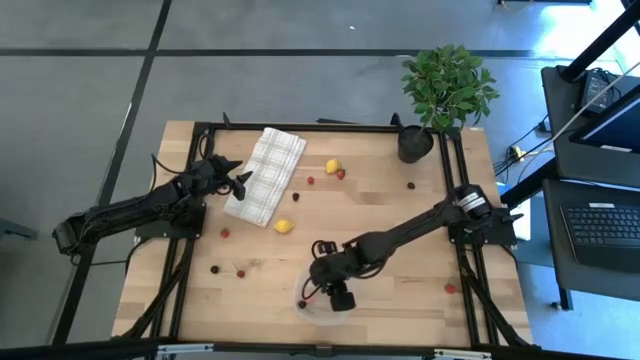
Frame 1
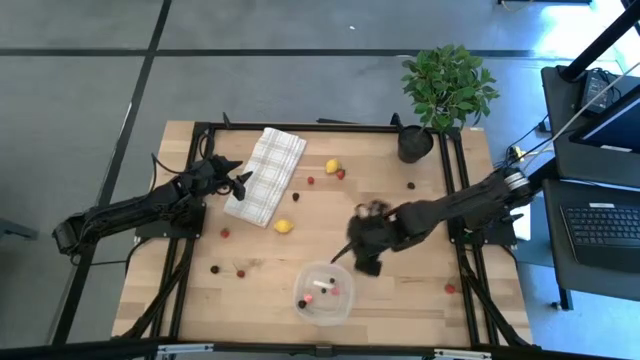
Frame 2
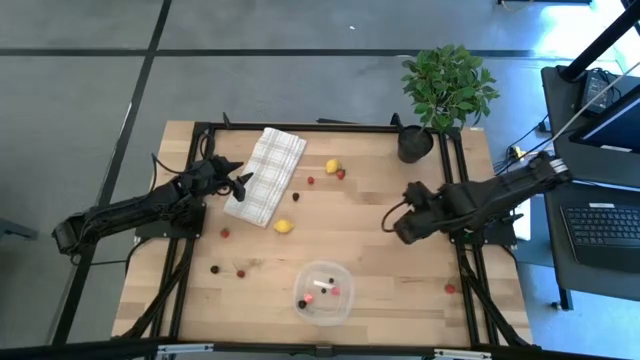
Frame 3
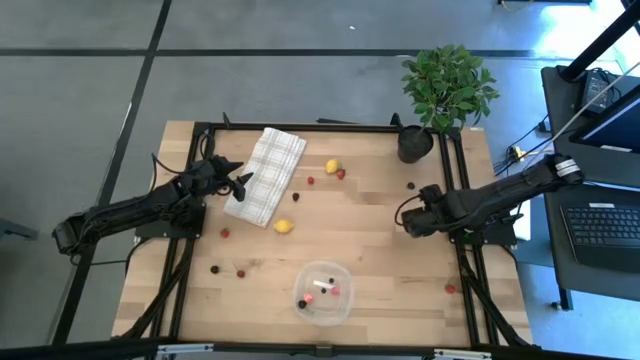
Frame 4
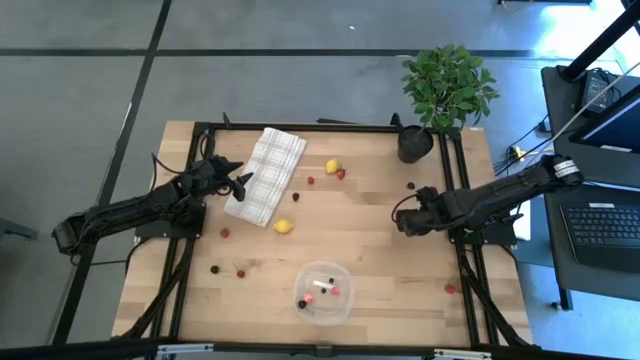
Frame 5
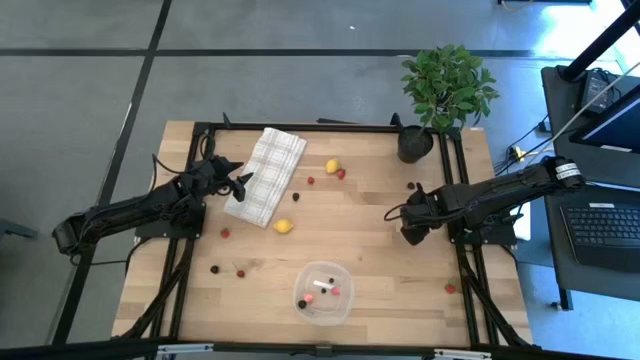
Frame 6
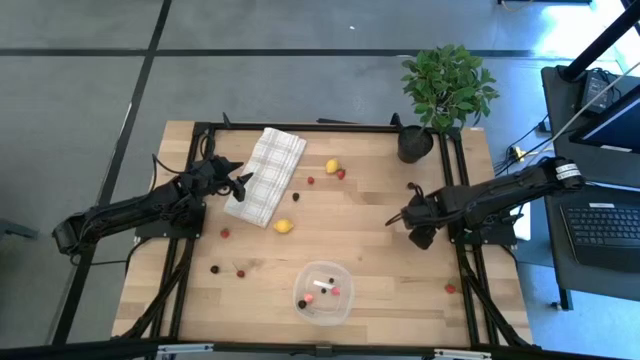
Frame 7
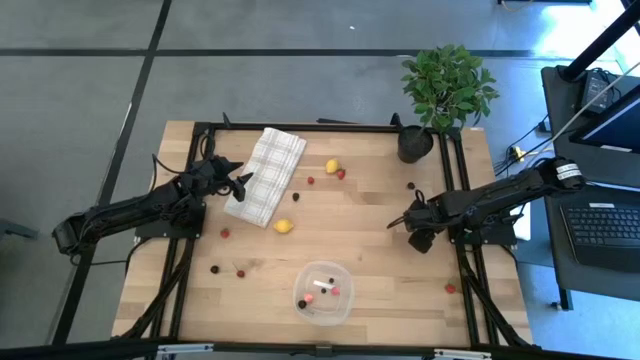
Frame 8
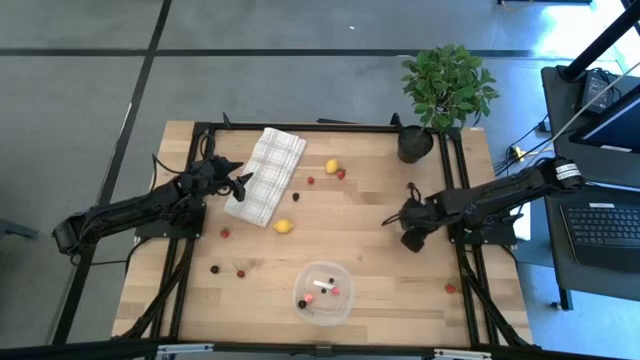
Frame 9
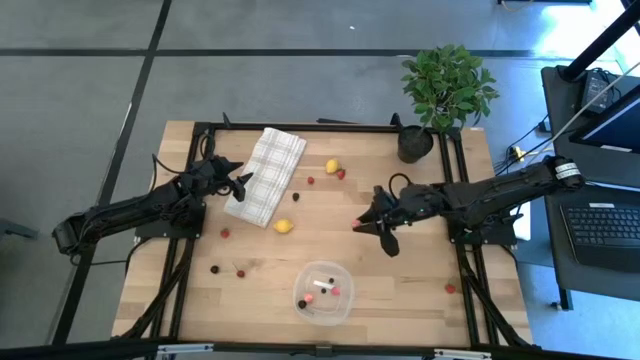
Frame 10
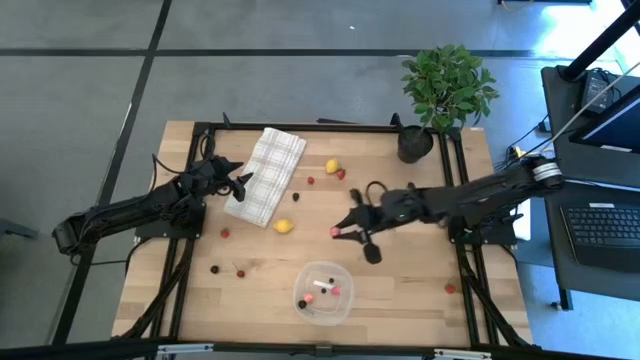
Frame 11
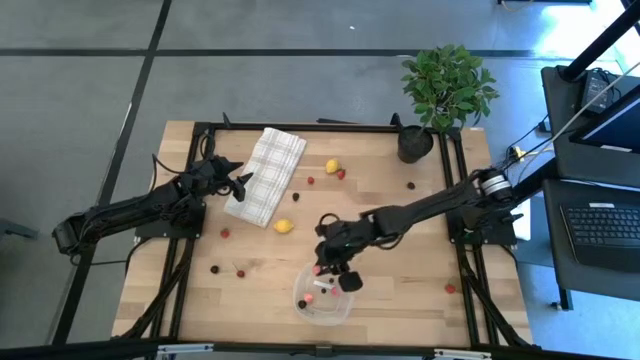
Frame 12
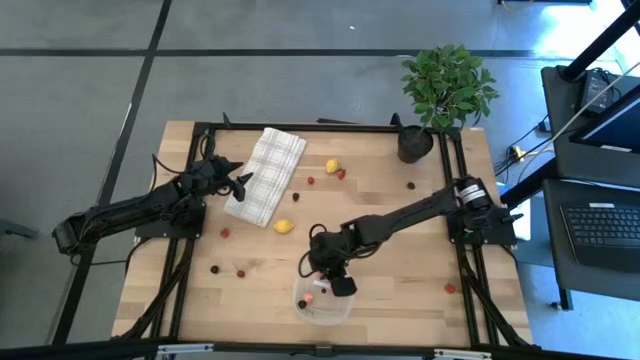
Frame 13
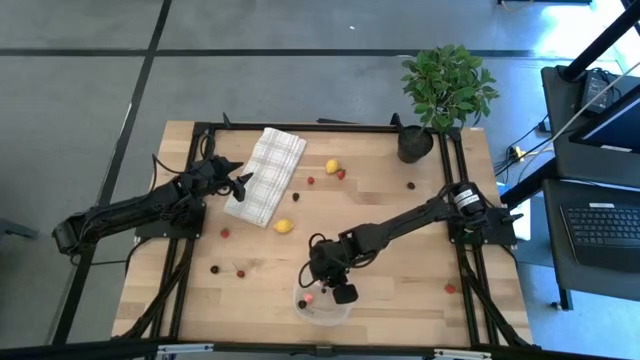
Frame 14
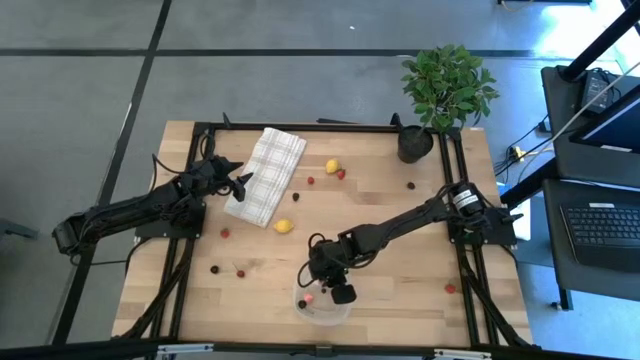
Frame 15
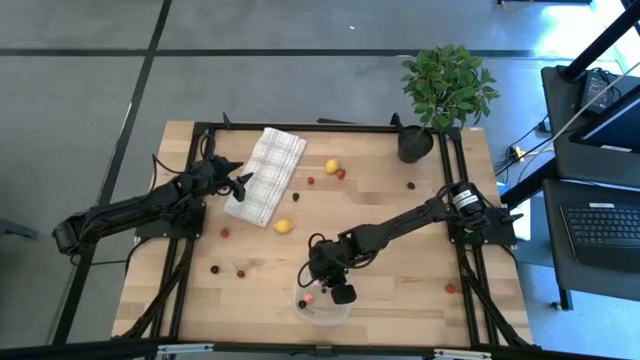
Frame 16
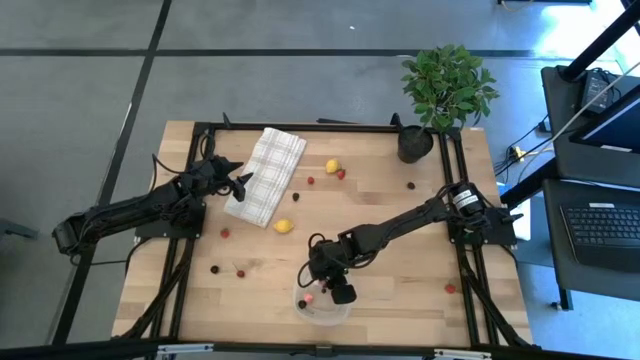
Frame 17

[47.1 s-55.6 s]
Task: Pick and placing Produce into tupperware
Put the peach into the transparent bin

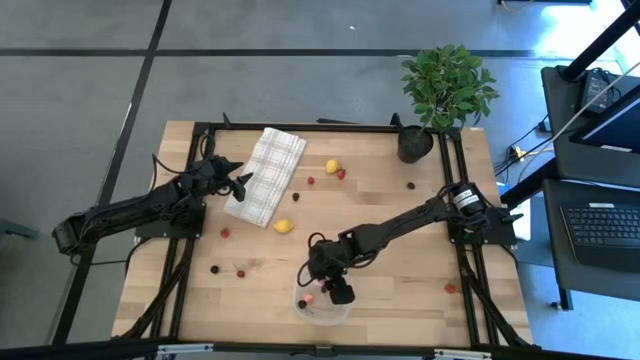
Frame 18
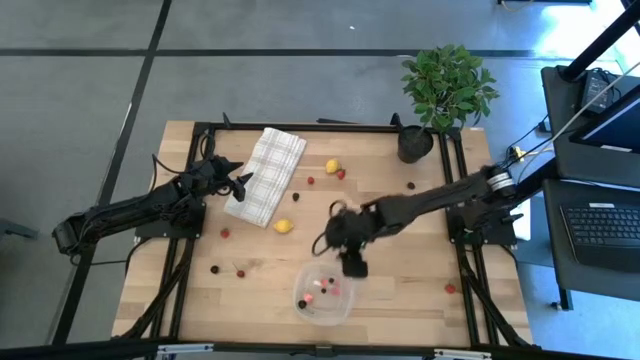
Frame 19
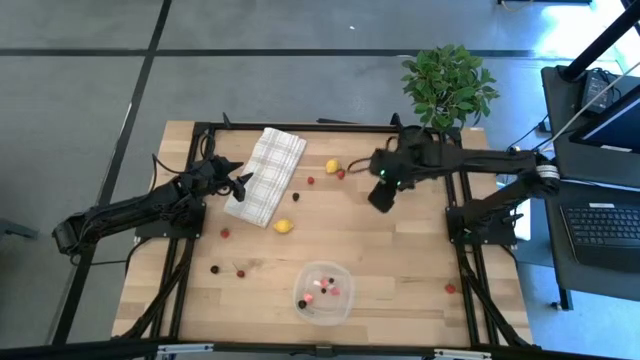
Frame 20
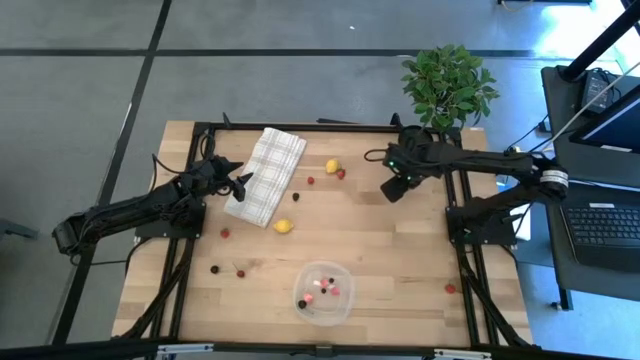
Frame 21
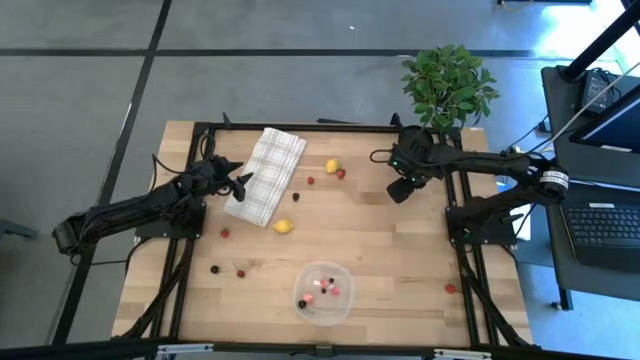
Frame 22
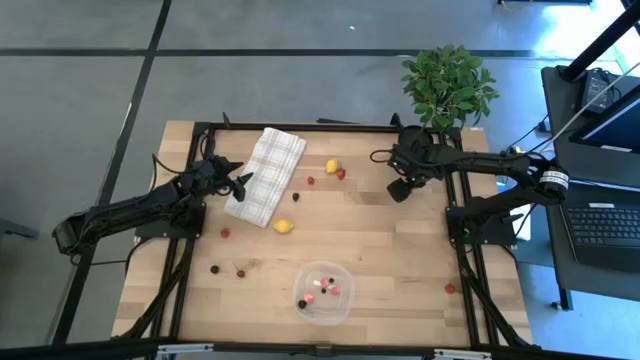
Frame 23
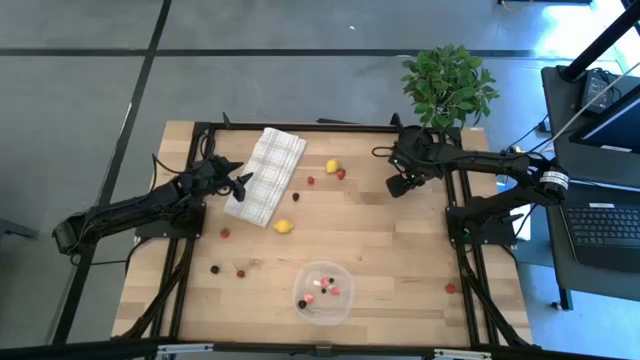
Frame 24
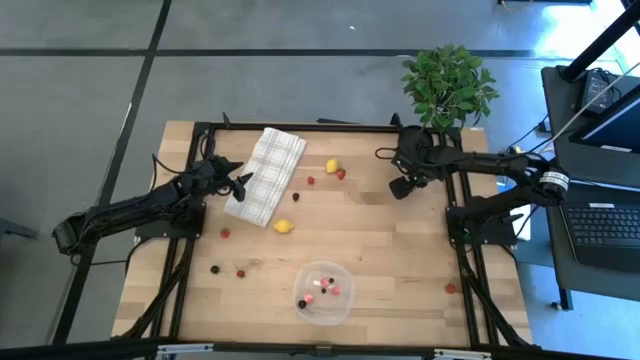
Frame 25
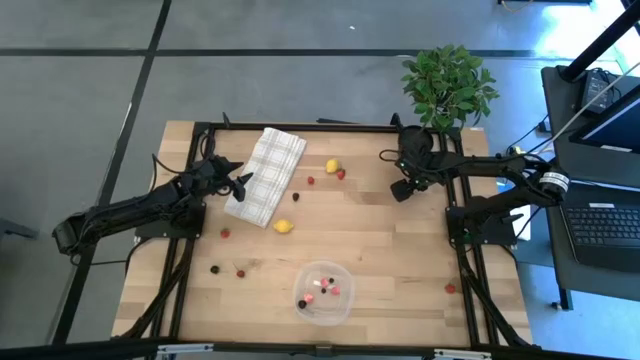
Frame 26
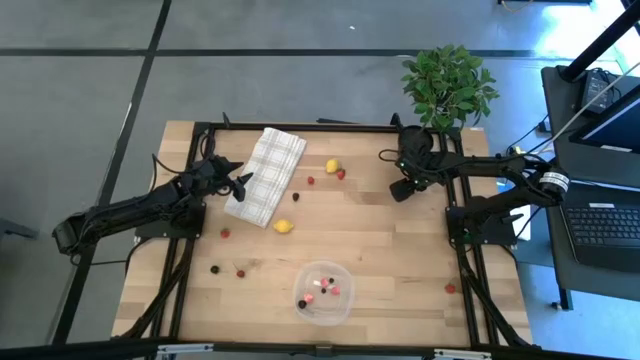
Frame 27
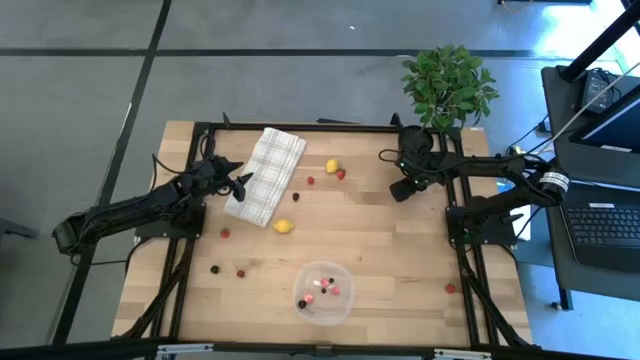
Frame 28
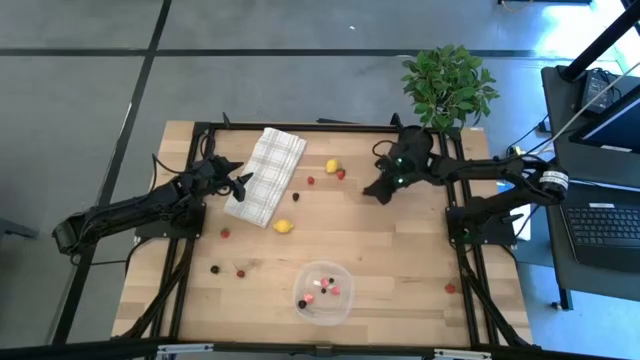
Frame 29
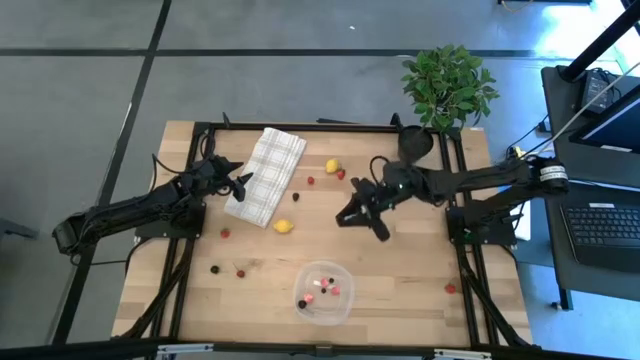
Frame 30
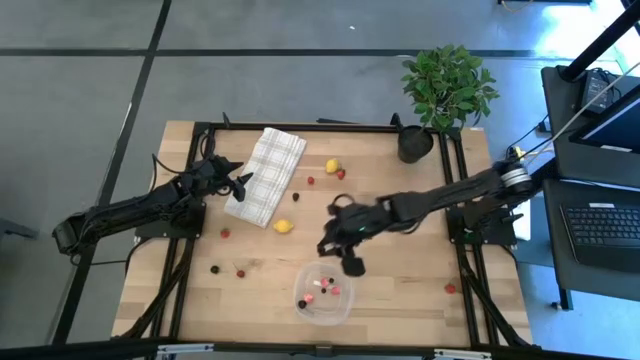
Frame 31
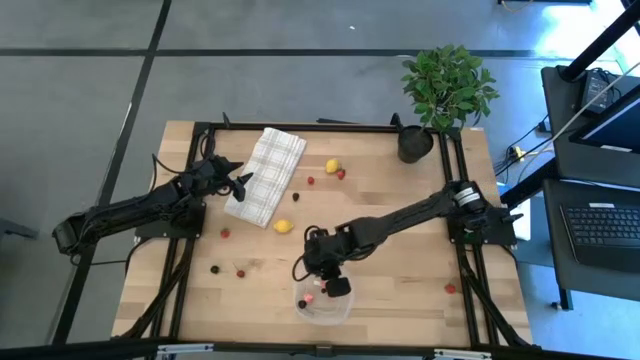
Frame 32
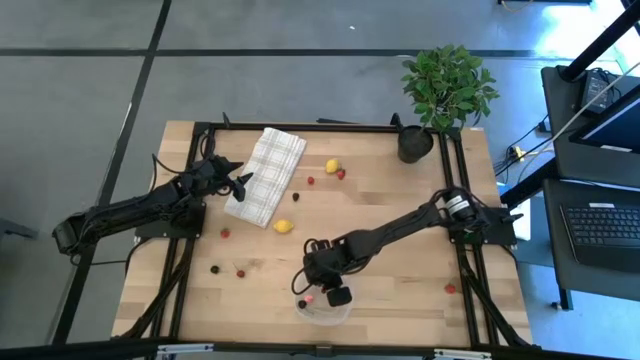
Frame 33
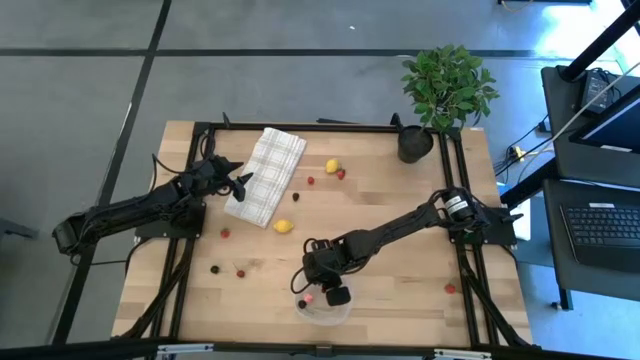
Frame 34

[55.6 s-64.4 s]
Put the right black raspberry into the transparent bin

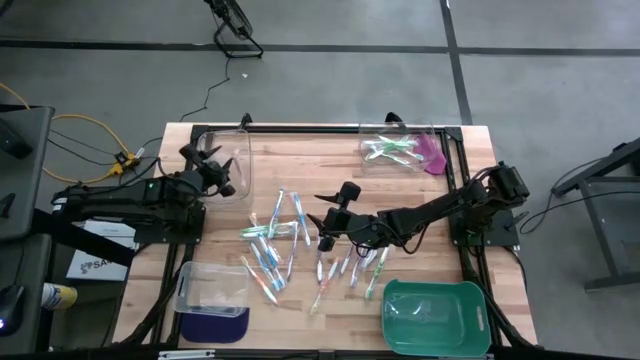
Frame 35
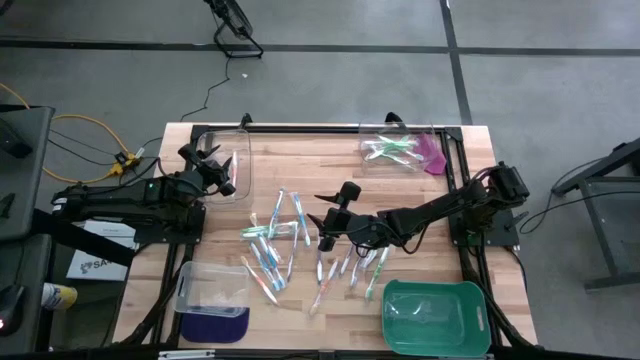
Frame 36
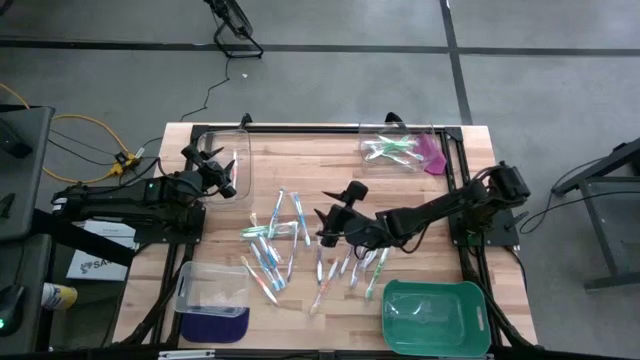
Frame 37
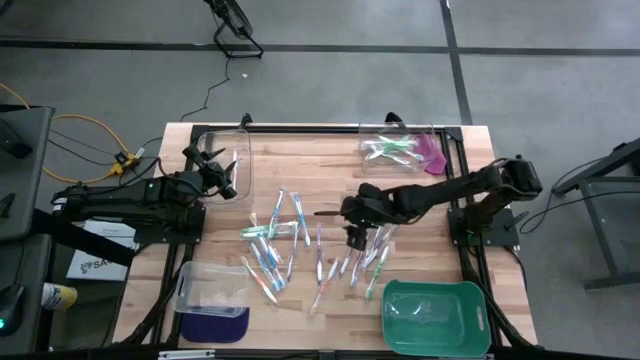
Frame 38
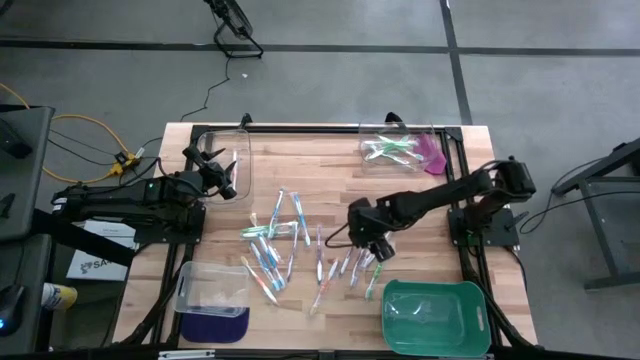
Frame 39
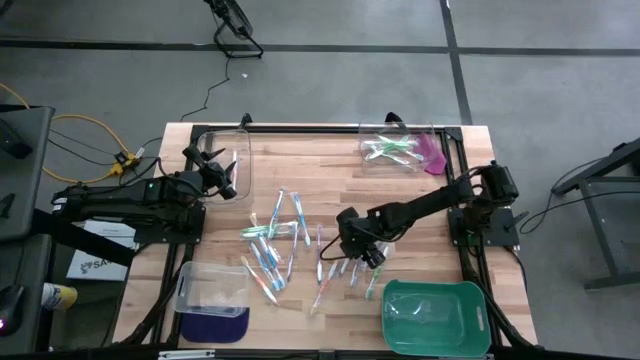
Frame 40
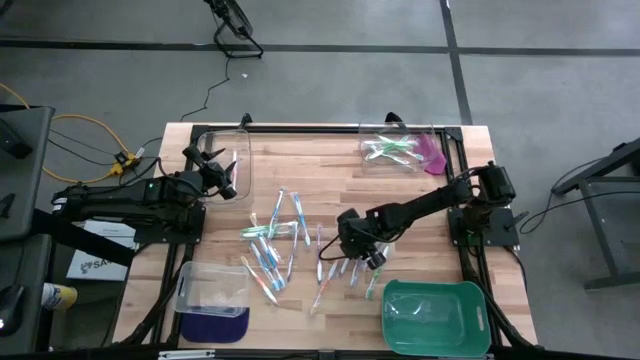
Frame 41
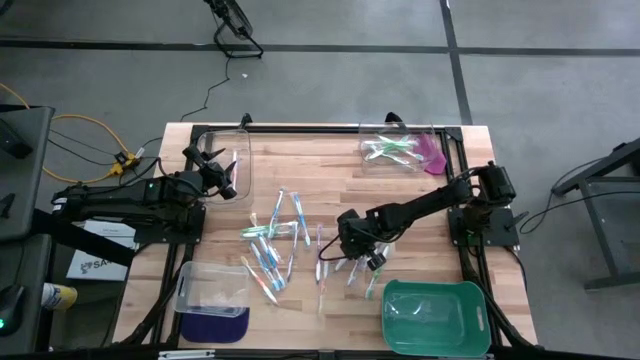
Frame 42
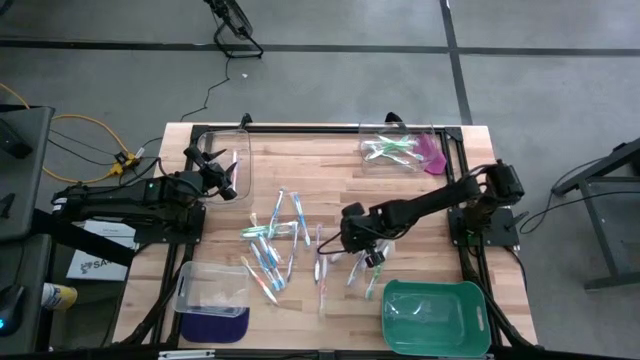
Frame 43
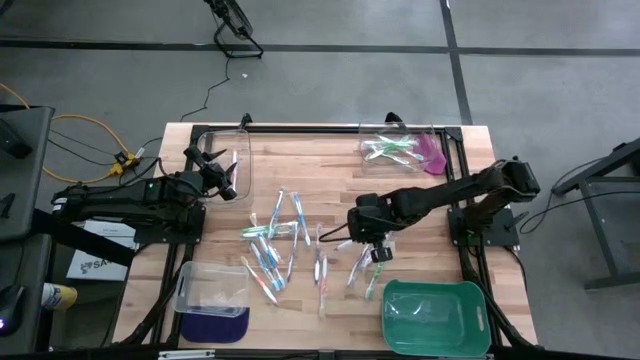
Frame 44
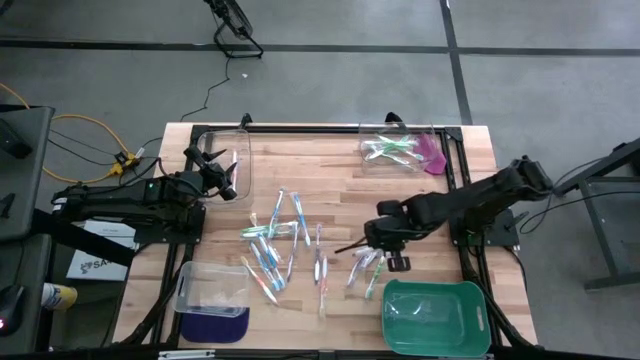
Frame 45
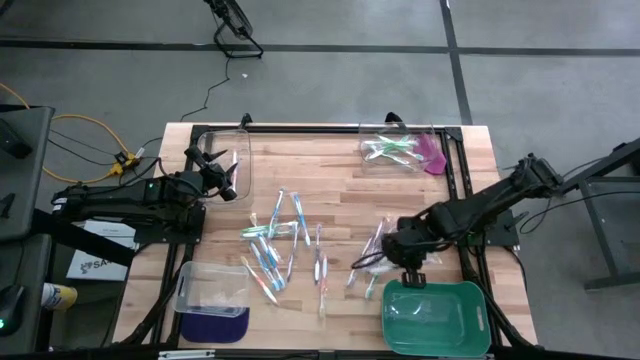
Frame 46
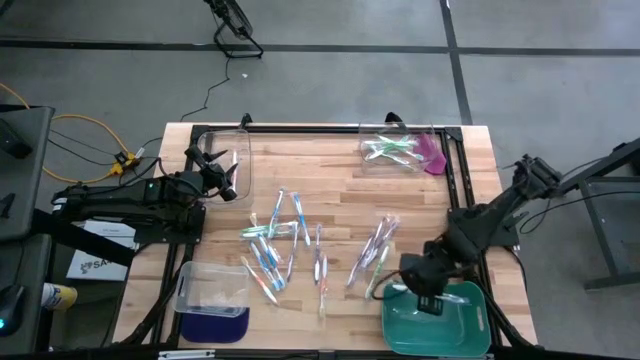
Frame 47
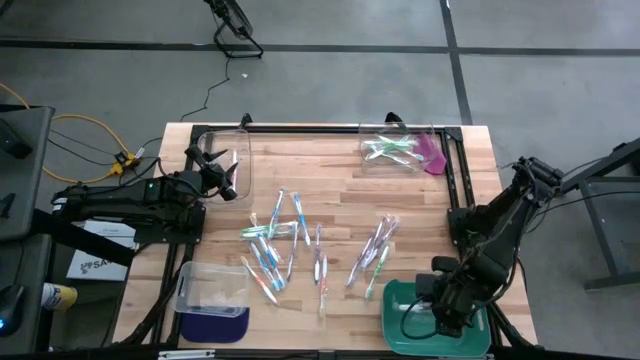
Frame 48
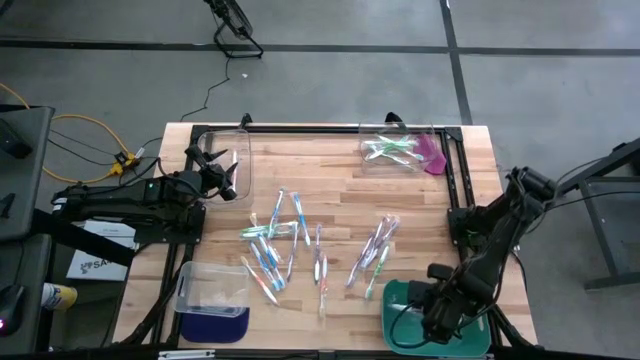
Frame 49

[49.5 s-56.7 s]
Task: Pick & Place Toothbrushes
Put the violet toothbrush into the green bin
